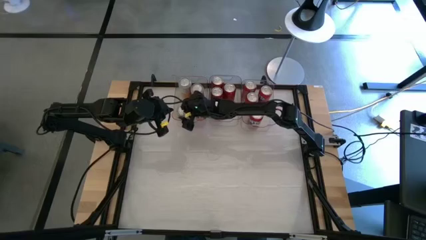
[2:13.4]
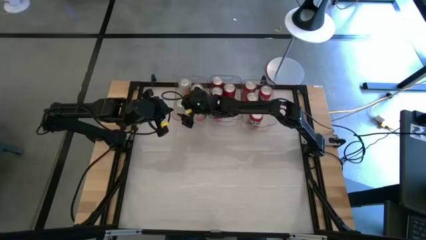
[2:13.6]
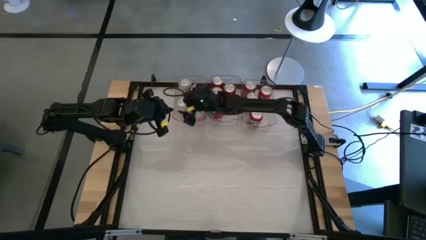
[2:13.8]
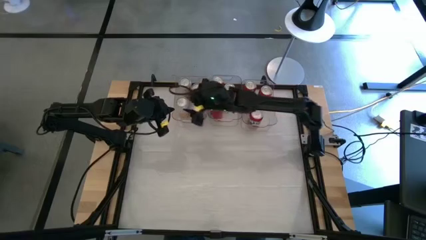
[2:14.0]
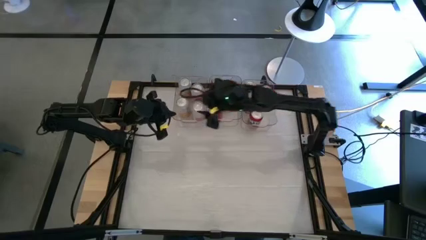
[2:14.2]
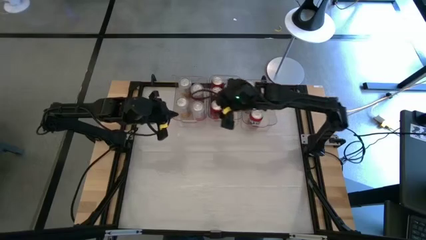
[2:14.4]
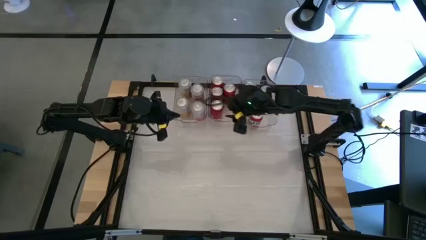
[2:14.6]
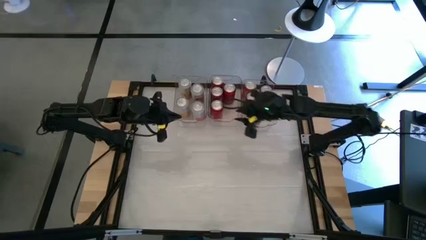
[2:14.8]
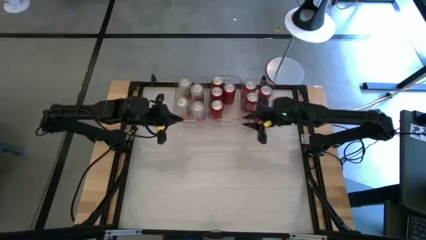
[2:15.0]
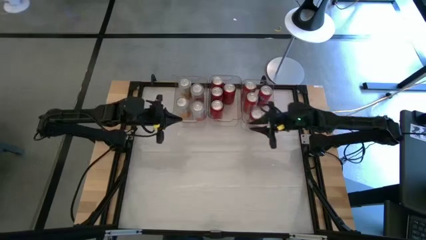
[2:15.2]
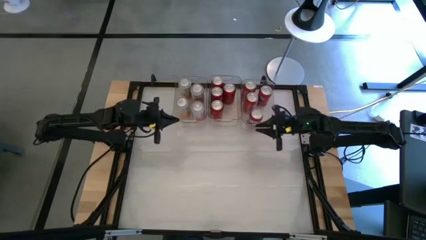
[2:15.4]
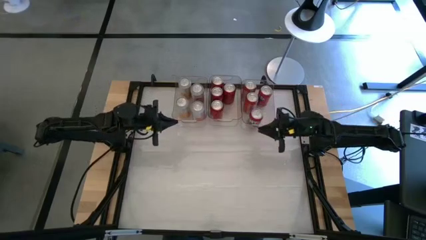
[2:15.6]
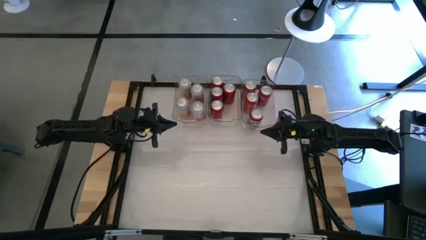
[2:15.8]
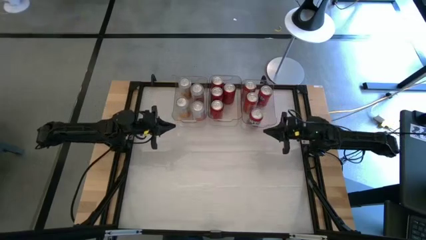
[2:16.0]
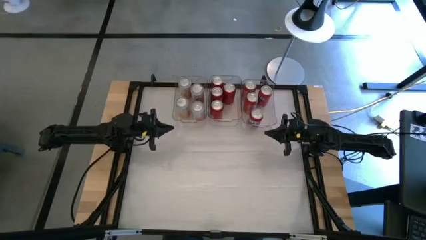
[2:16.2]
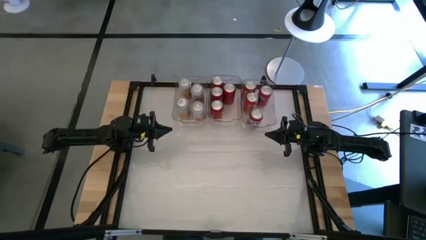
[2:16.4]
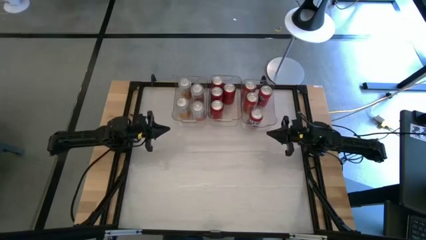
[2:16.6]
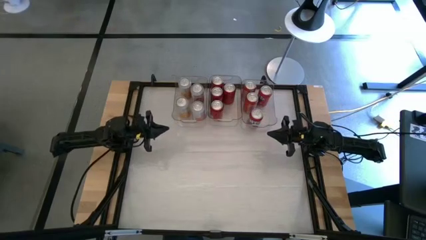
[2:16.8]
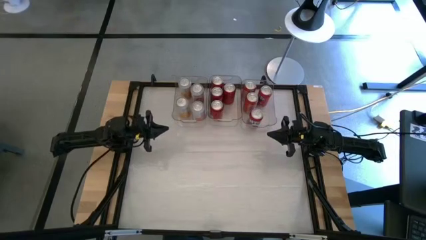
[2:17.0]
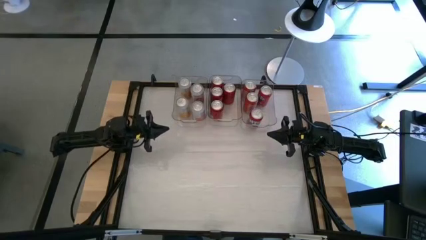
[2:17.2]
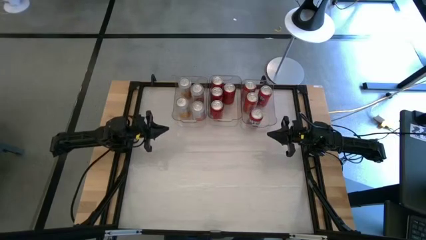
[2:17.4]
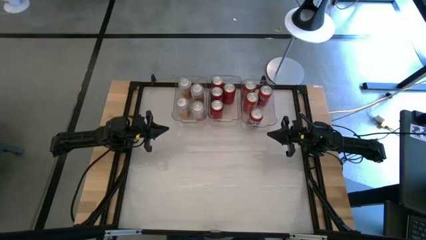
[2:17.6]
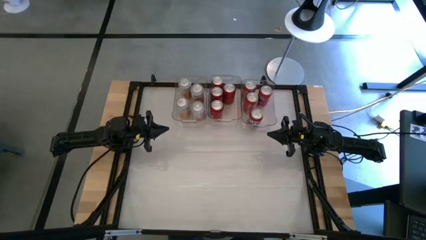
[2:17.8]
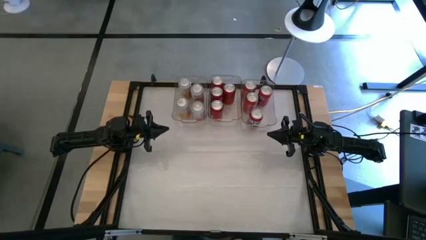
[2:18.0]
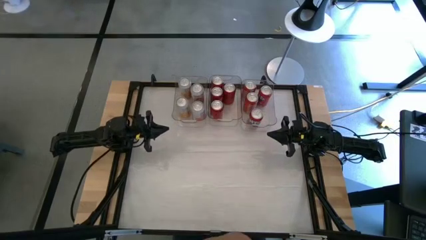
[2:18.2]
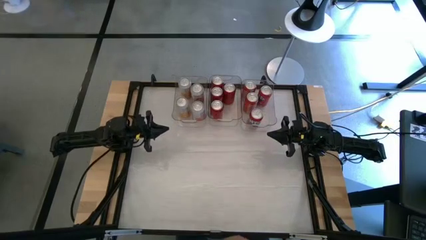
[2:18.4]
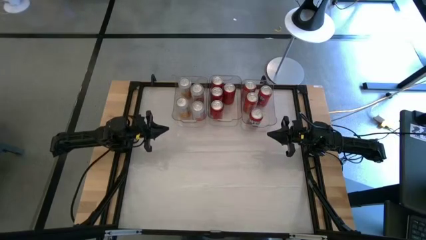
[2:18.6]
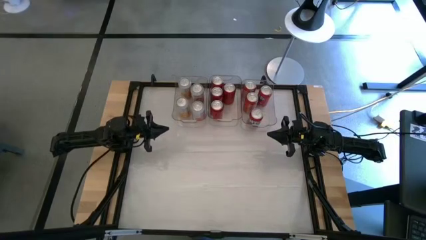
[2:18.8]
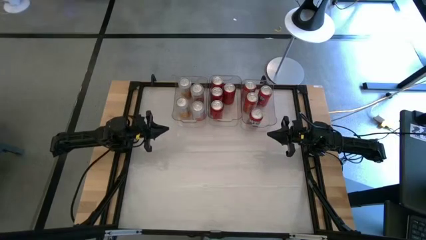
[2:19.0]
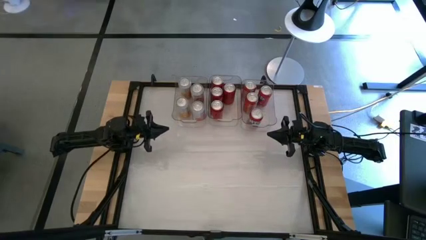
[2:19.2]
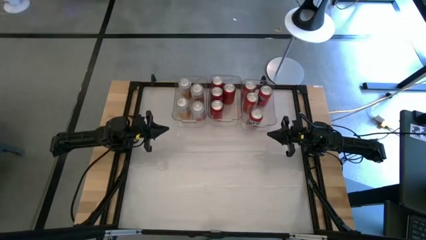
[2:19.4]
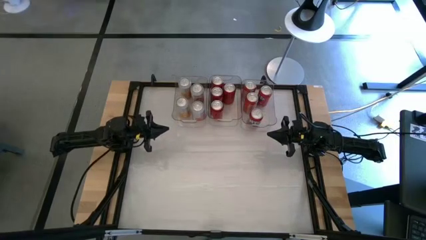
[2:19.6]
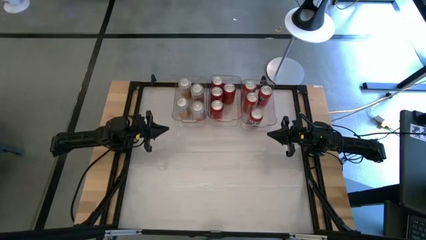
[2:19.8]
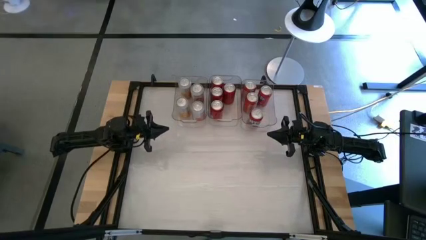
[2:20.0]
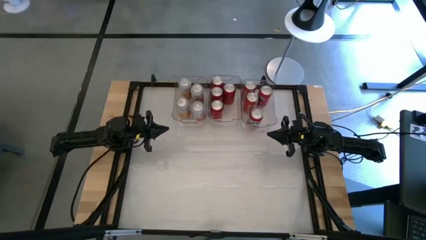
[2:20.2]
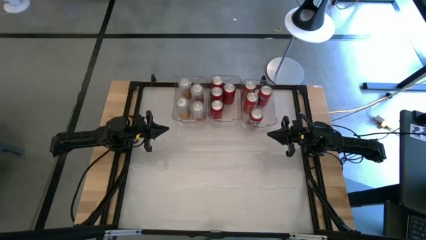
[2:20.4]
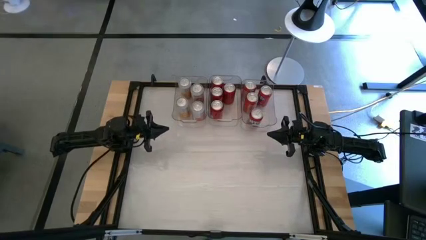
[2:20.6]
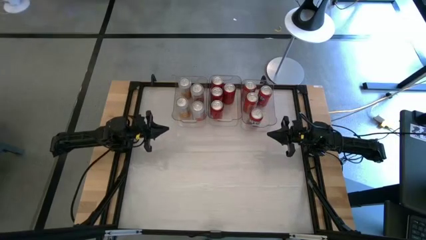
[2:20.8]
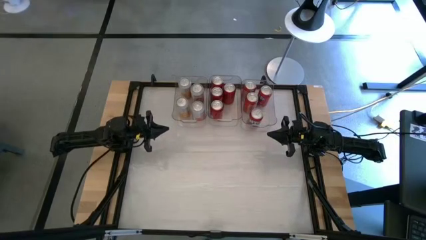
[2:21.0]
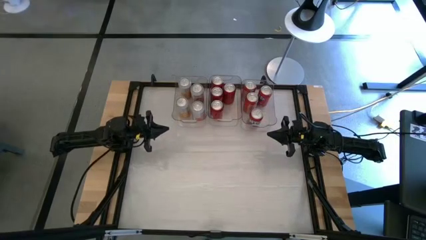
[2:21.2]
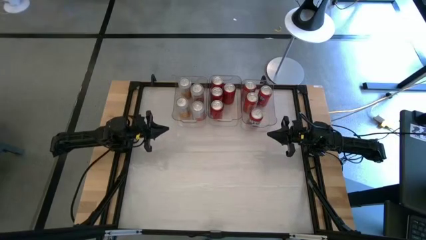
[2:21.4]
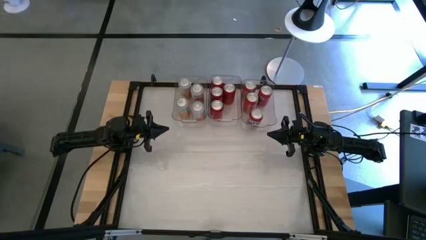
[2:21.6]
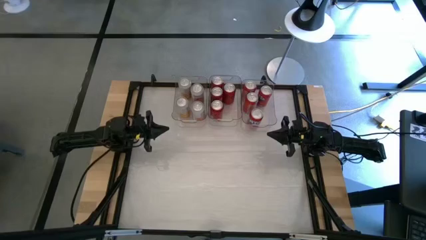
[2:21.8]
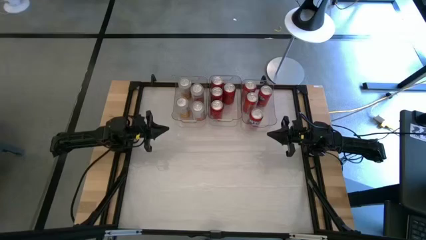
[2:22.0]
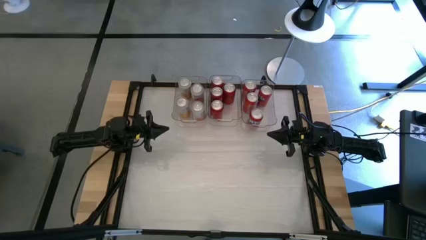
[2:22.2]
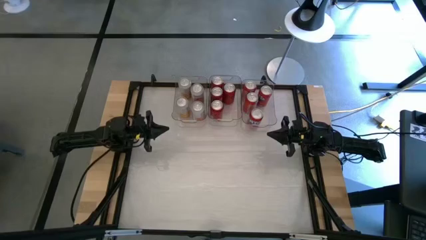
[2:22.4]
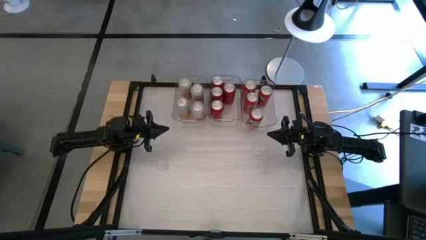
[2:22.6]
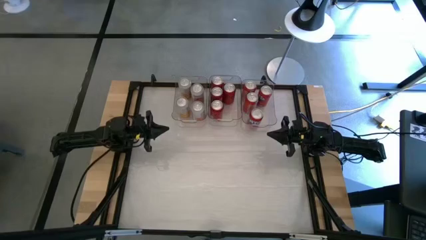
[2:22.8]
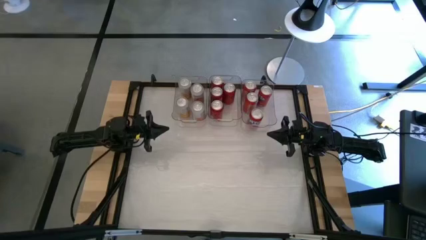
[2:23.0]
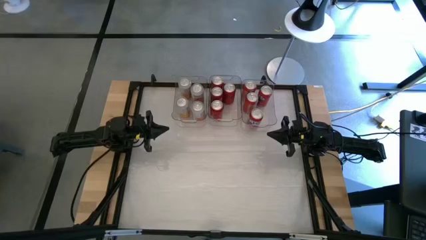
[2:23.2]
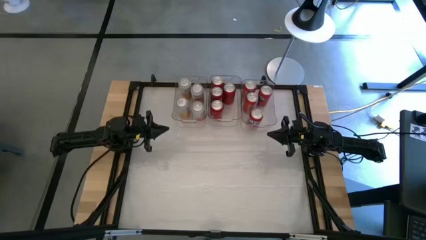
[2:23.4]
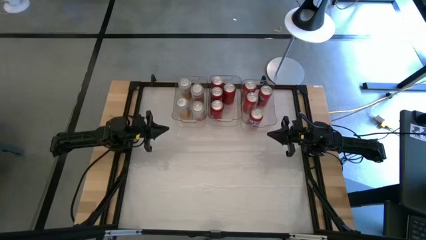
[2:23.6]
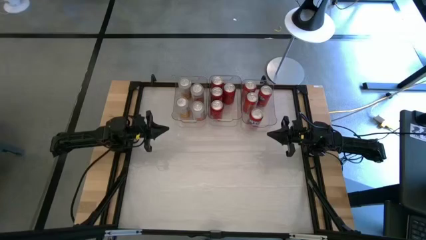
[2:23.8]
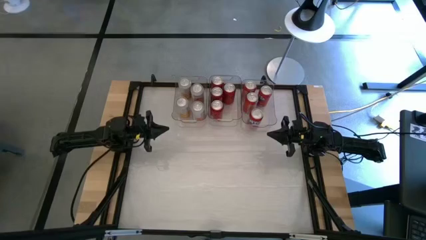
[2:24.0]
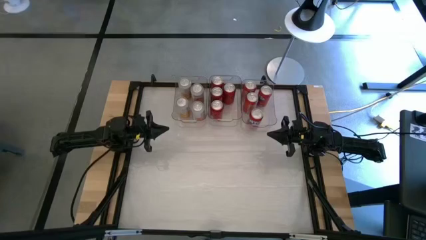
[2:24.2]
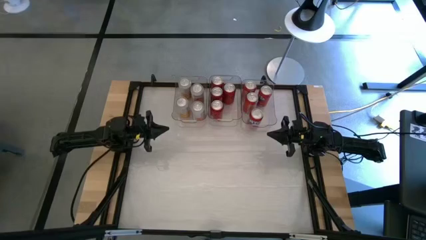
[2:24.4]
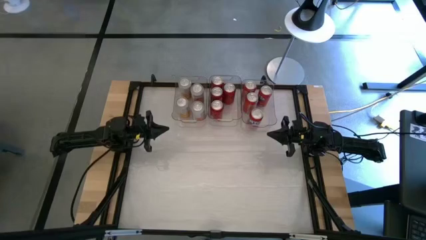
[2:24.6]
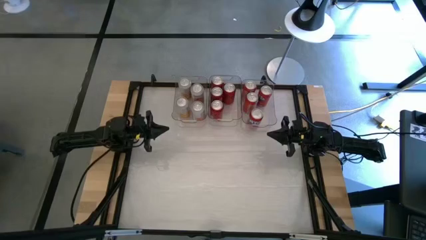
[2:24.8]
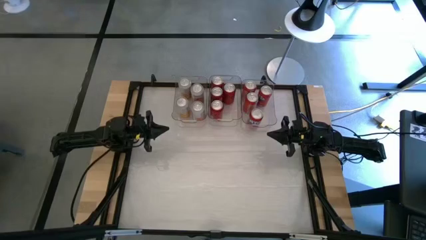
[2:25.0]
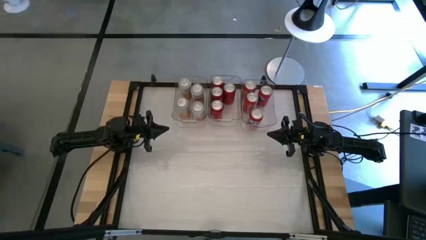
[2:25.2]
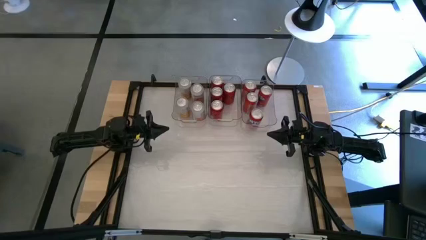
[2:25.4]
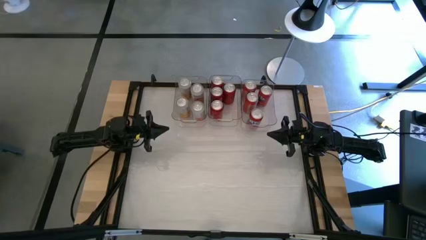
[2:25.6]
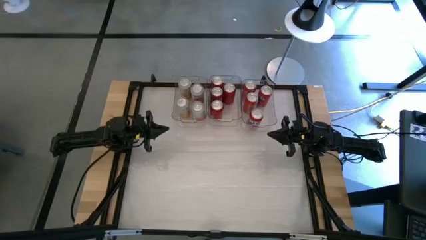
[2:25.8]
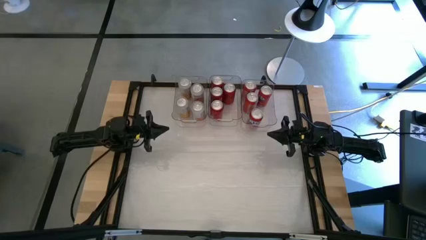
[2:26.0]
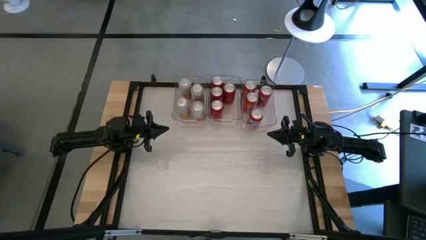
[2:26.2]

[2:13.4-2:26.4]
Task: Sort soda cans
Return to Home Position
